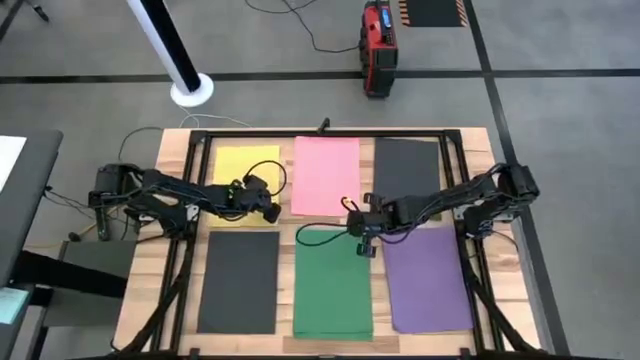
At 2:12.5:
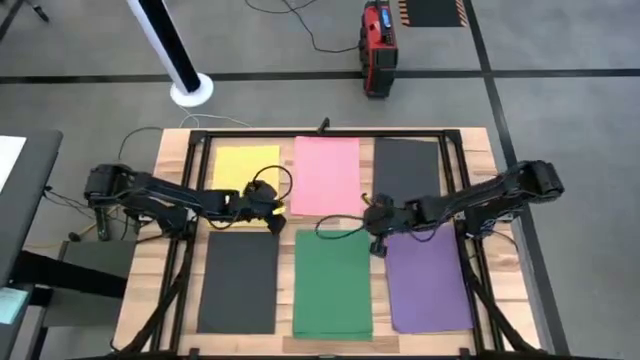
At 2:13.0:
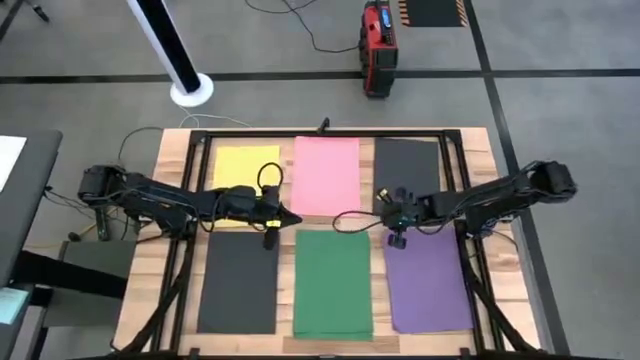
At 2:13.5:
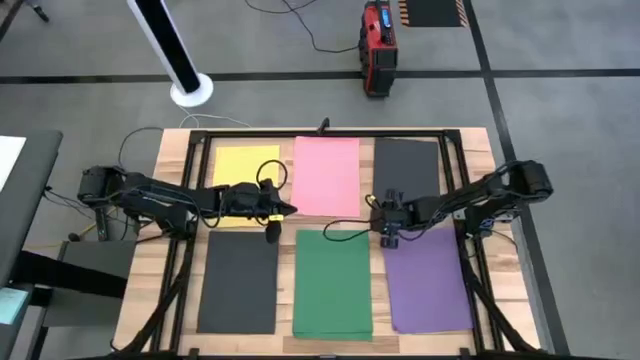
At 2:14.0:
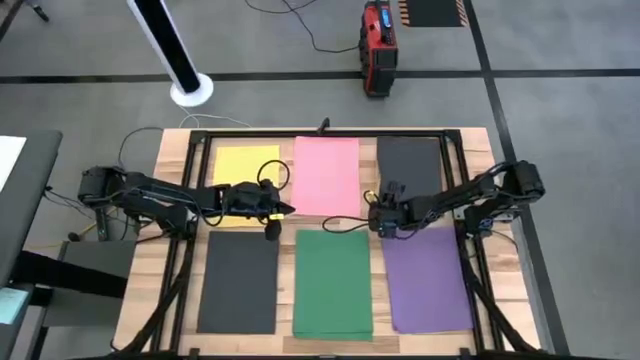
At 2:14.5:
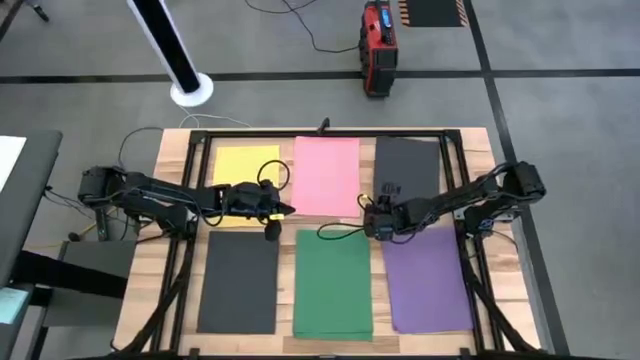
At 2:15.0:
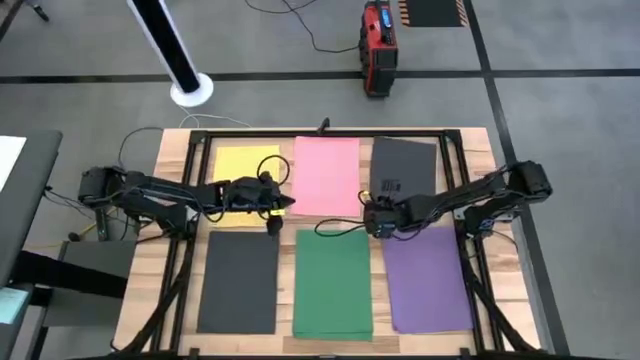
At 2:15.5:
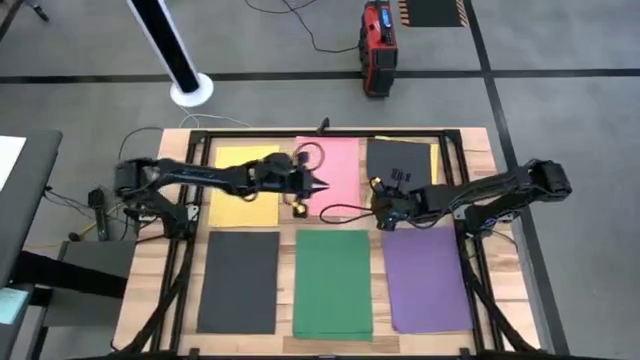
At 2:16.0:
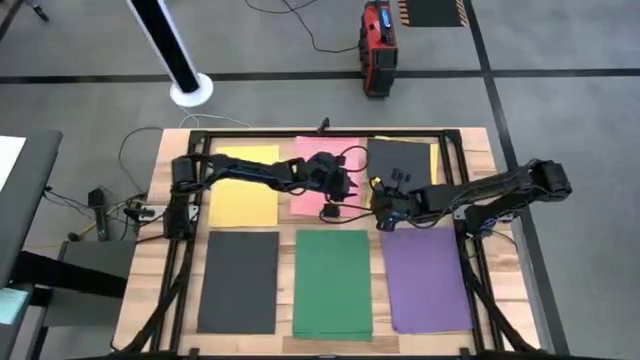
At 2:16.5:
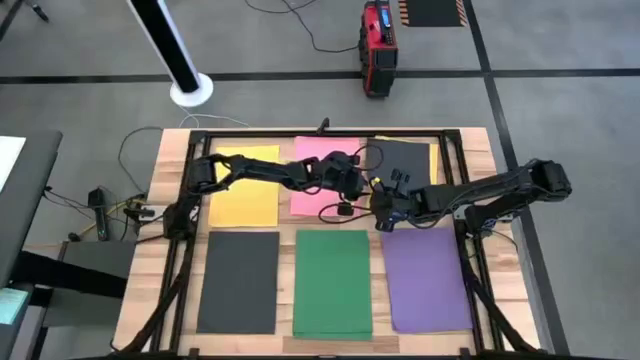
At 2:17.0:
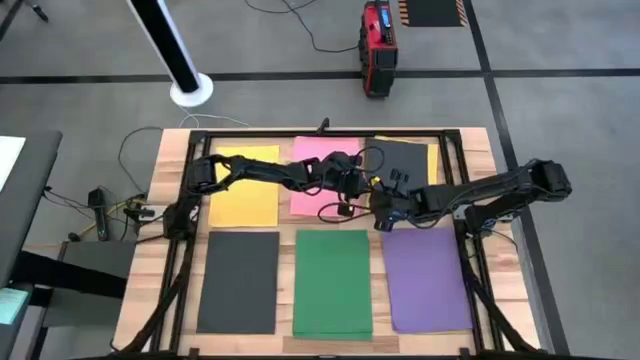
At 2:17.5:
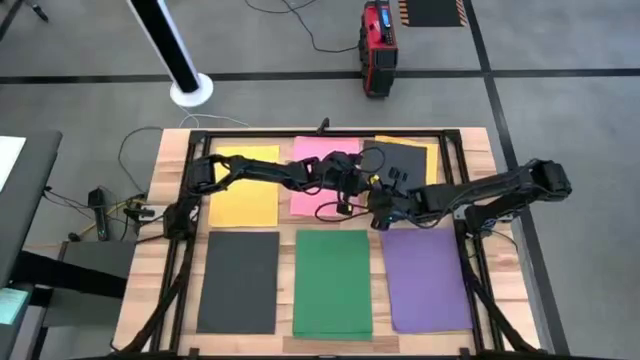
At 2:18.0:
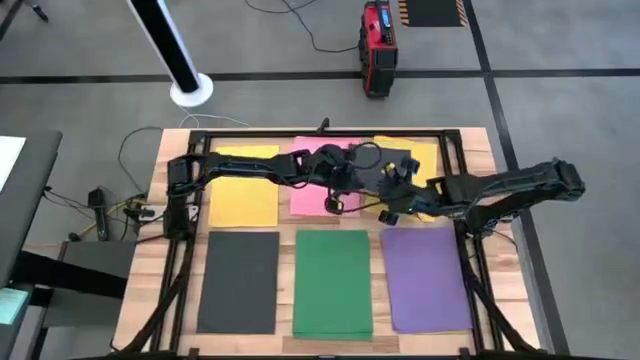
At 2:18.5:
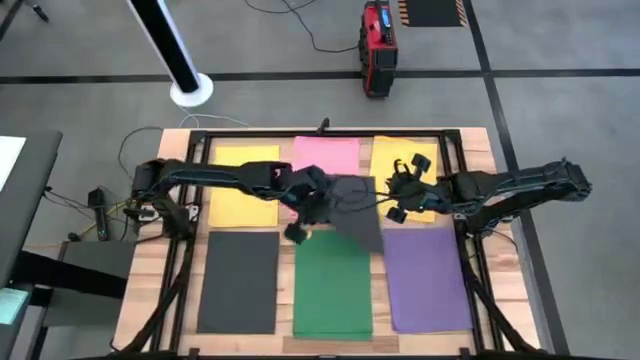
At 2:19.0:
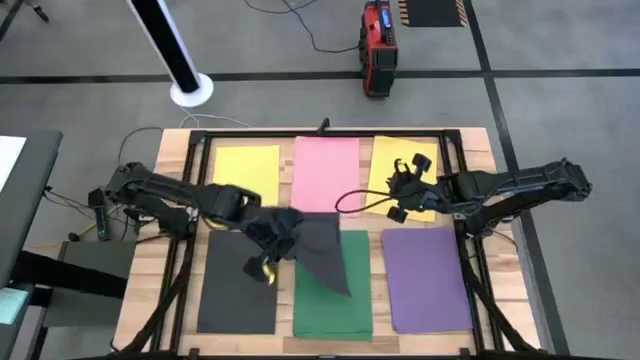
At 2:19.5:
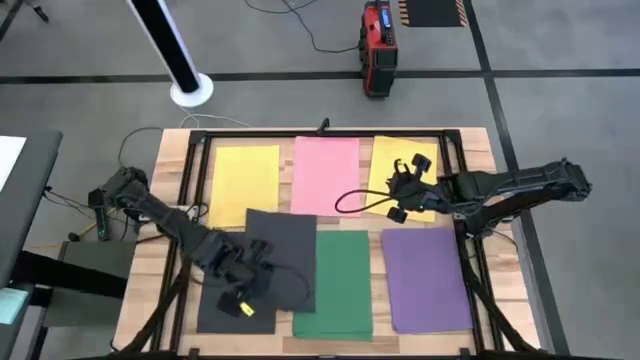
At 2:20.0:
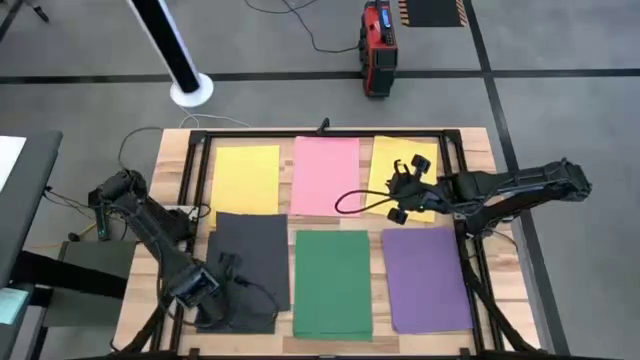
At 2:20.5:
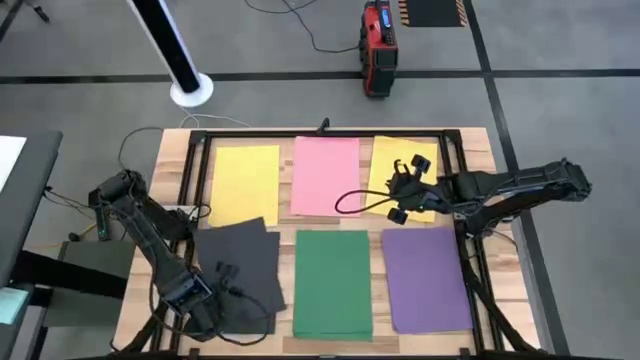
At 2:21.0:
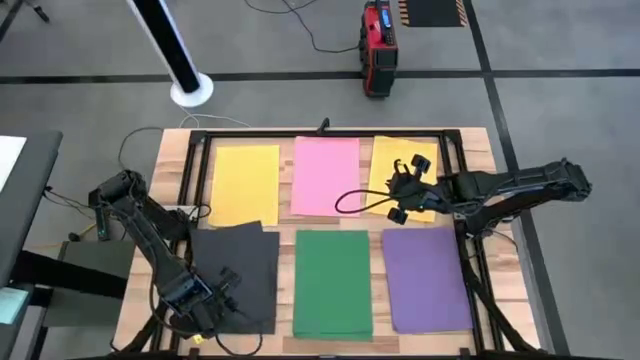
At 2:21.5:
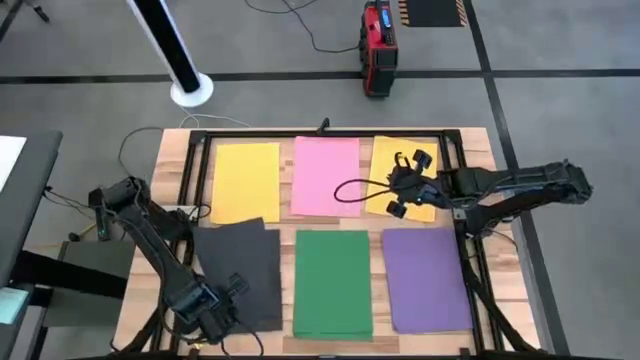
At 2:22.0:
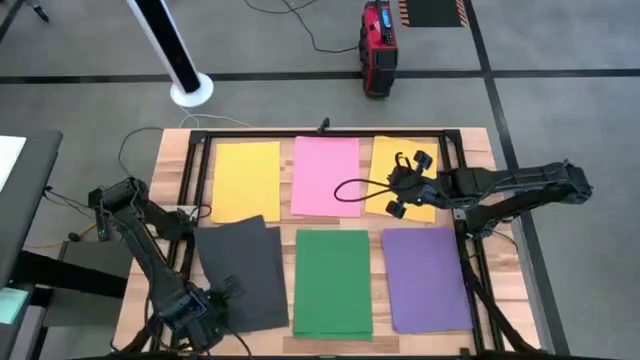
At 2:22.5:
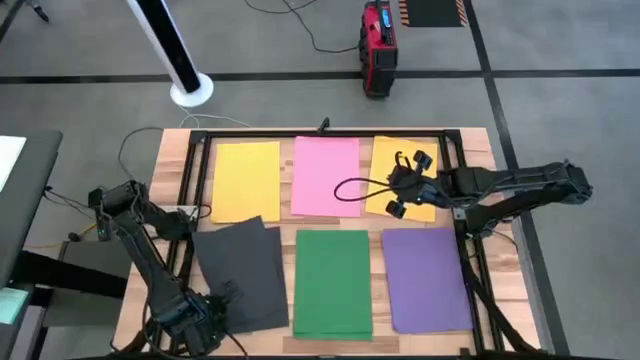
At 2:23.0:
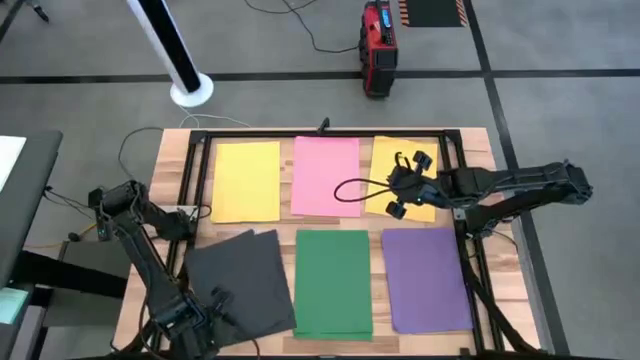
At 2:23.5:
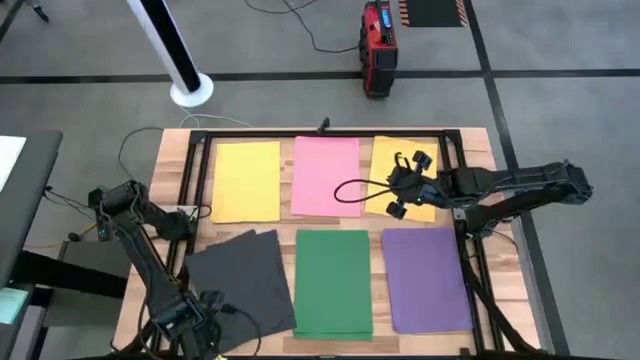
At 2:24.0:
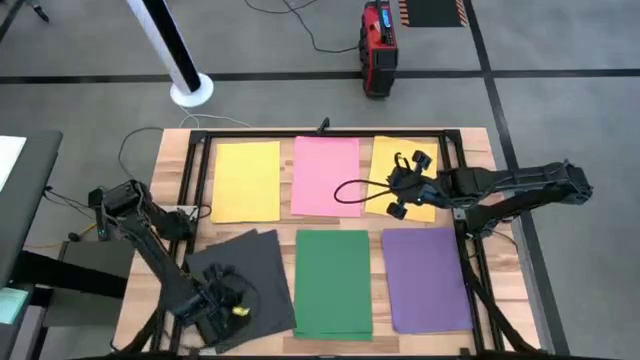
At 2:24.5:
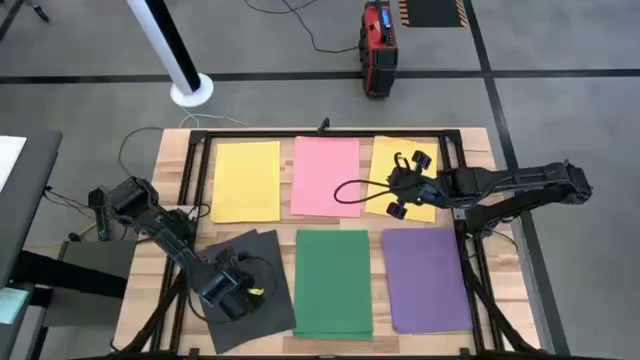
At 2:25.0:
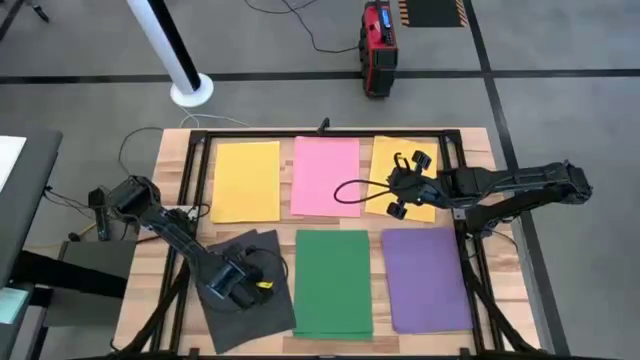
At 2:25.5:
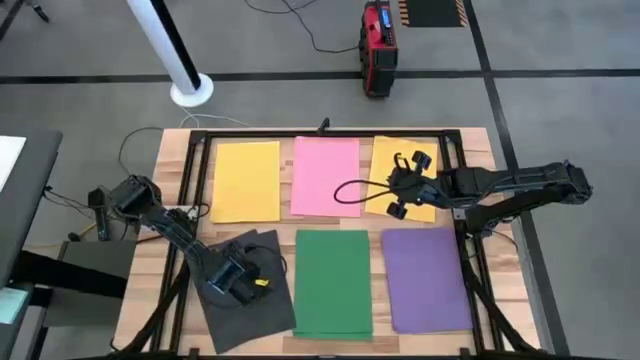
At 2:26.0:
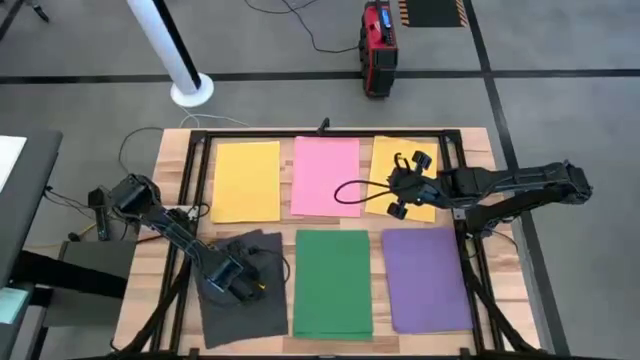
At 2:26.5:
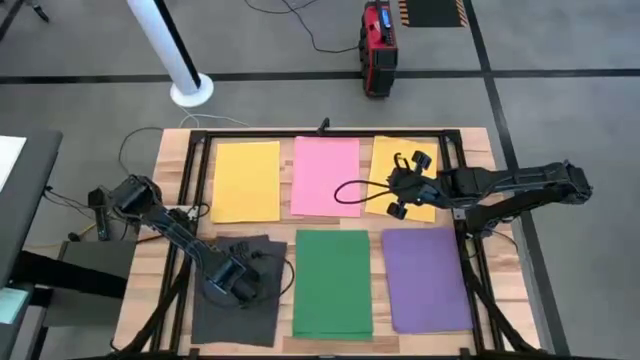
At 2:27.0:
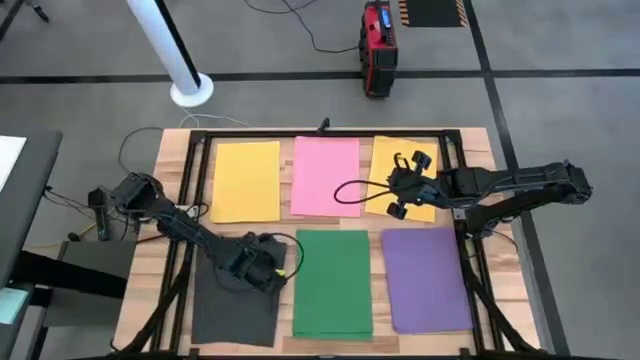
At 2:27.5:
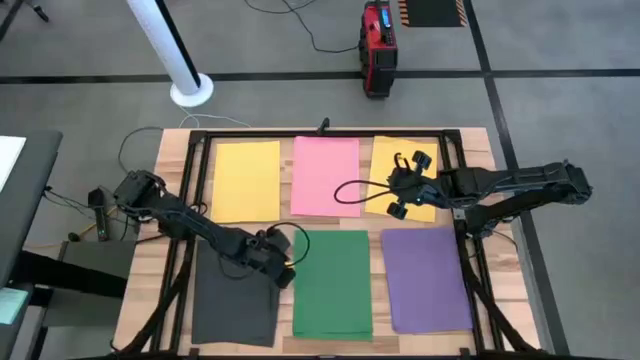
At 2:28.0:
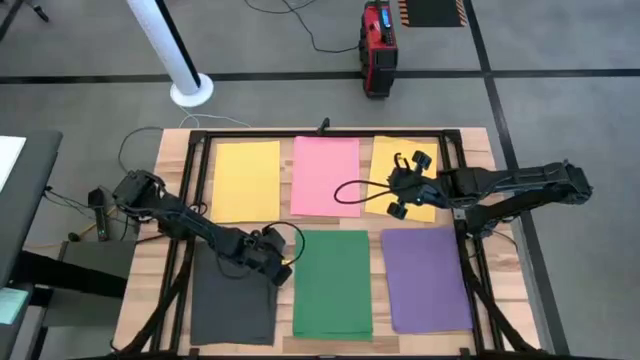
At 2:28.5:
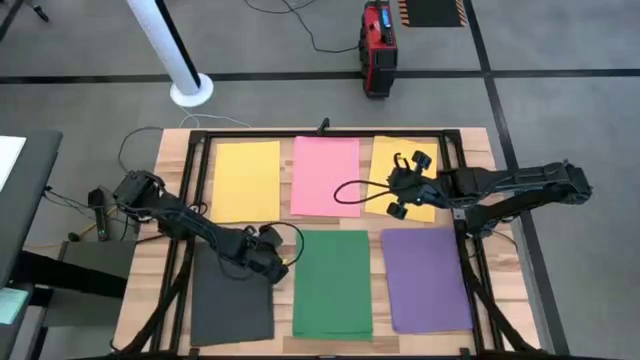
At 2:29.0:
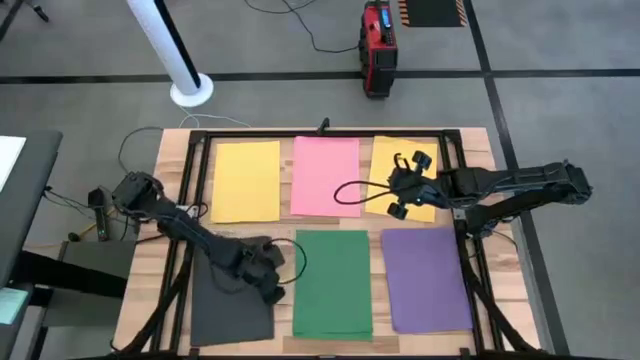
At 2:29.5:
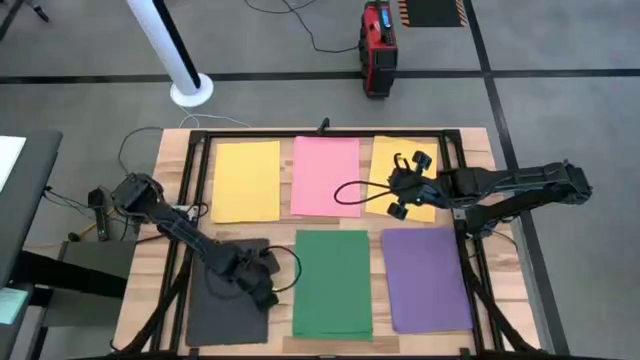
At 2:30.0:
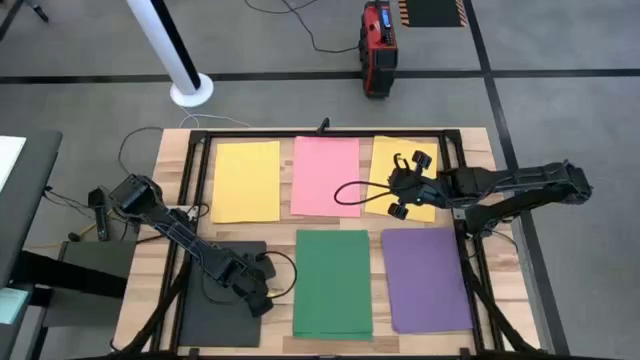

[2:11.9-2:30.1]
Task: Organize paper
Stack the top black colored paper on top of the bottom black colored paper

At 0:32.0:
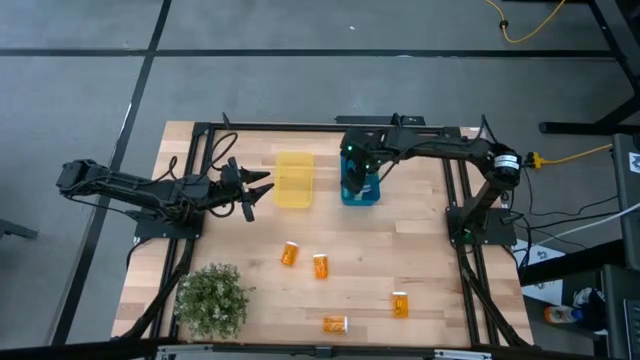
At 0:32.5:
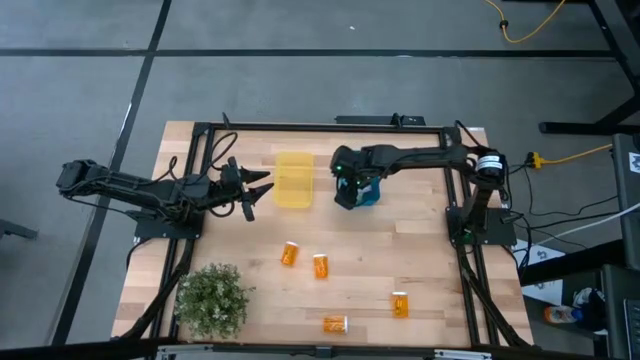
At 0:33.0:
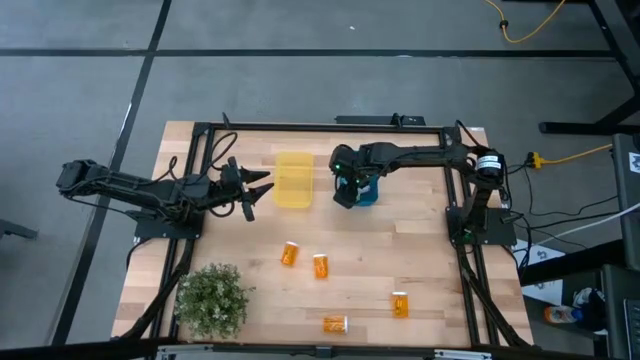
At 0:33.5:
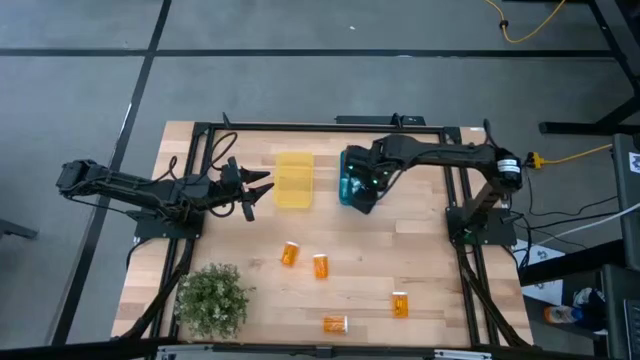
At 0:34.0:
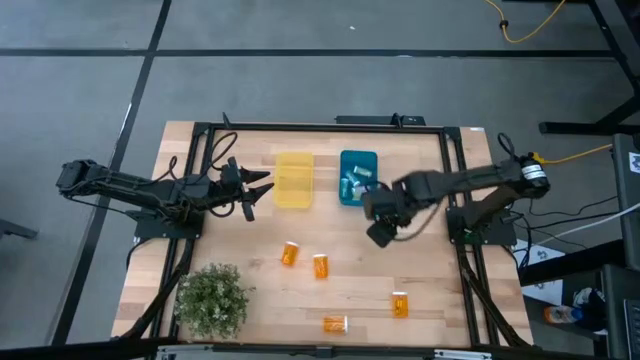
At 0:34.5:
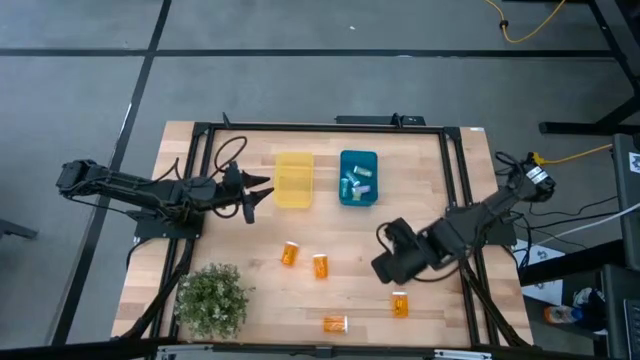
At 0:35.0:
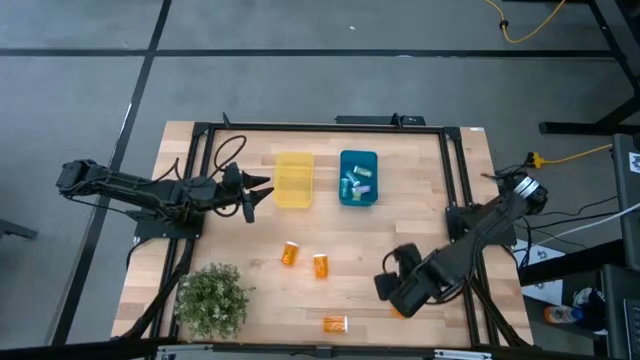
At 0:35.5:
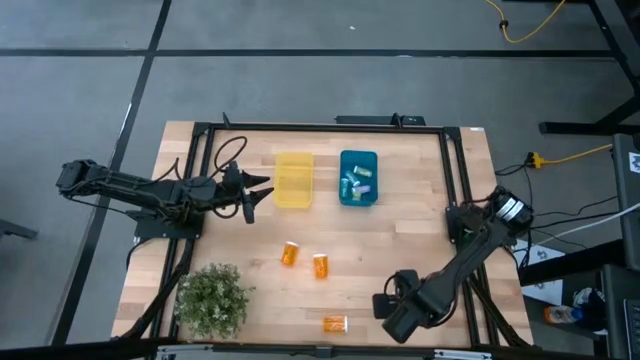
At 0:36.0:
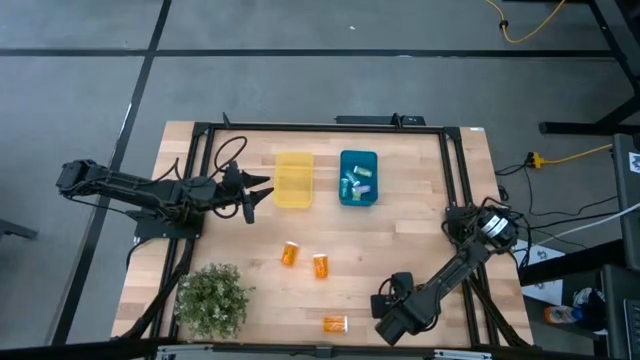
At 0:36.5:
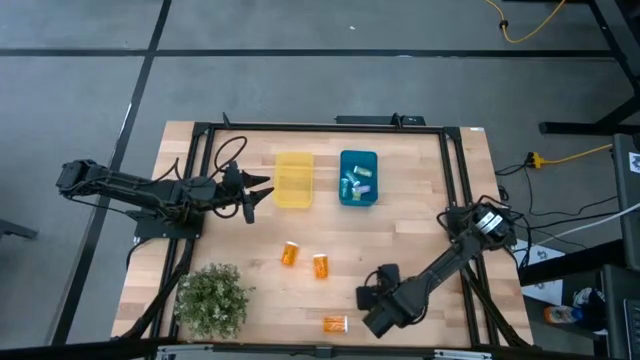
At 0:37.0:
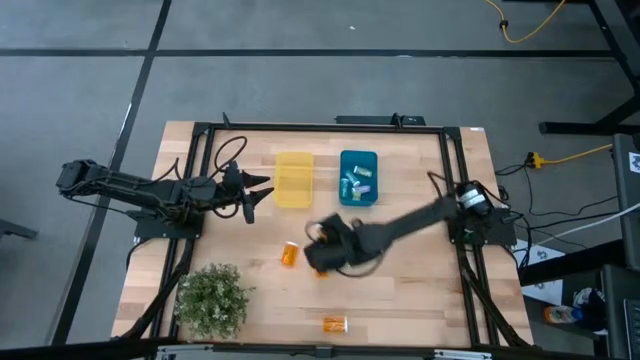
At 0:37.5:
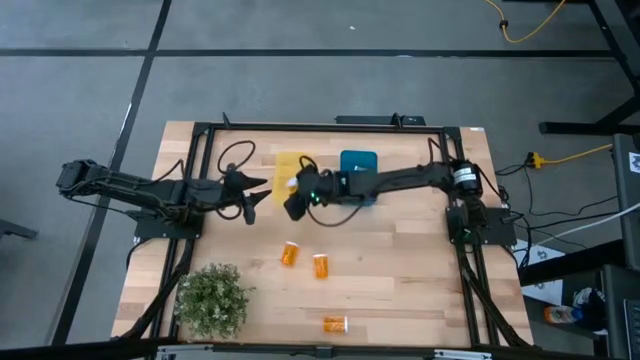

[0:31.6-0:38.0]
Task: Pick and place medicine bottles into bin by pill shape (circle, oval)
Put the orange pill bottle into the yellow bin
